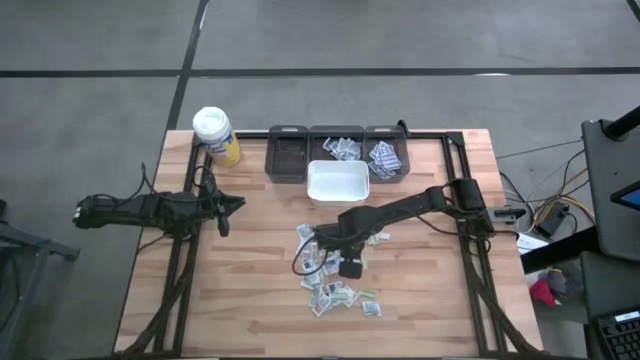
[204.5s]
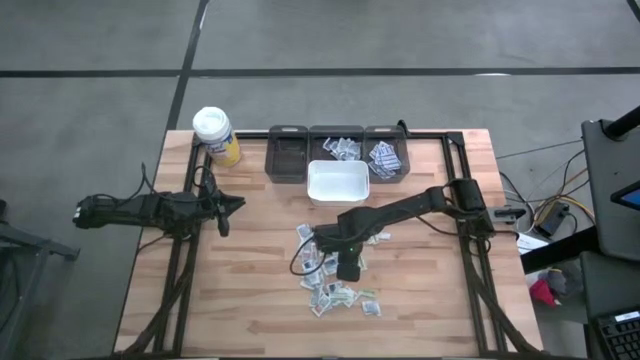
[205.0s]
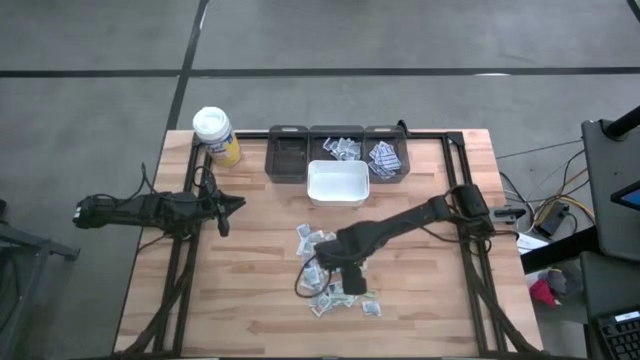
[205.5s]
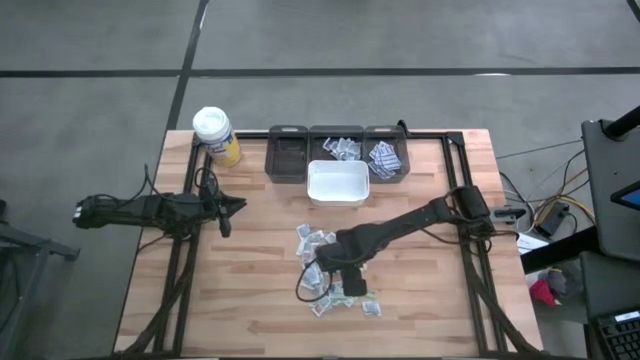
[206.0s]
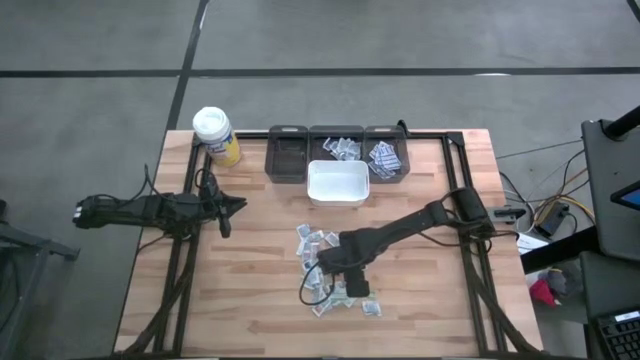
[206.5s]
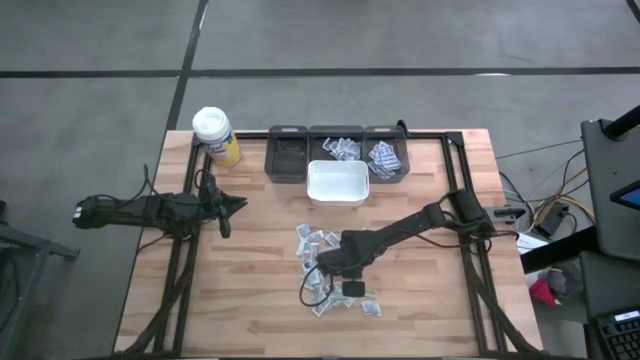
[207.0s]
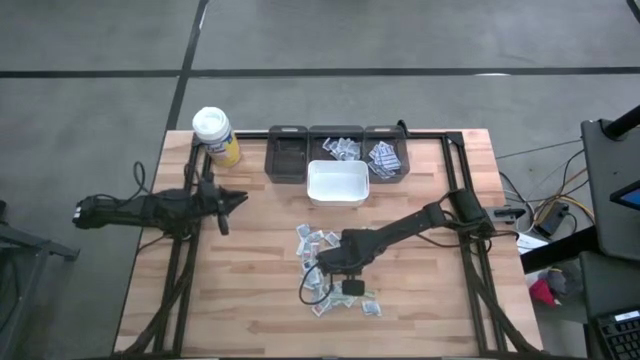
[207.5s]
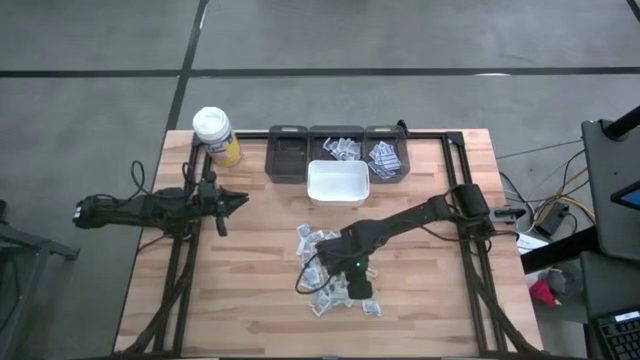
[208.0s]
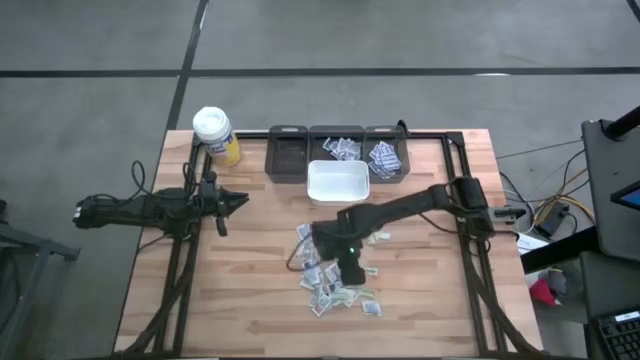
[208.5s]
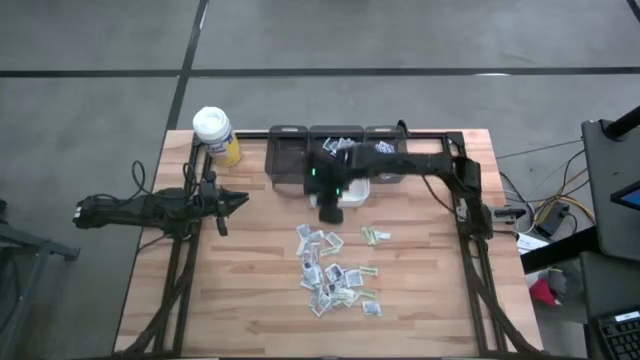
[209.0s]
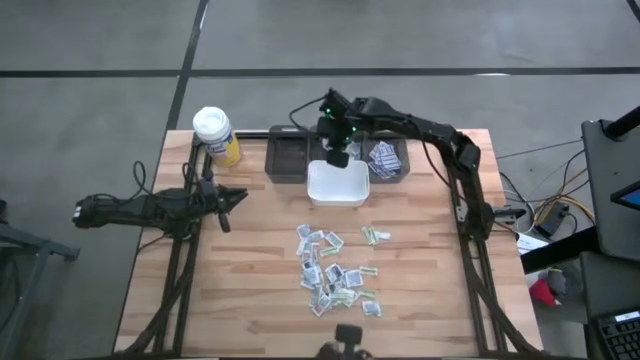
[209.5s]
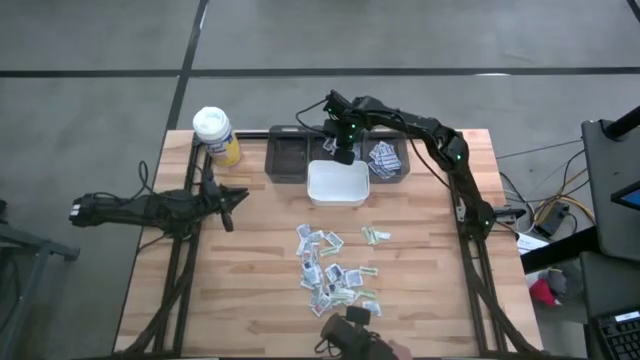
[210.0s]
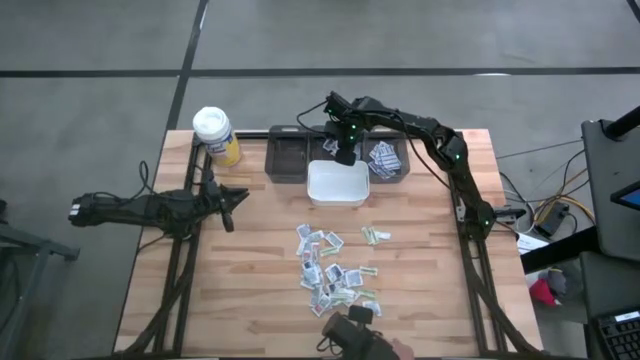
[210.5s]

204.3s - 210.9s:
Task: Pick & Place First Aid Supplies
Put the alcohol pad into the middle black bin

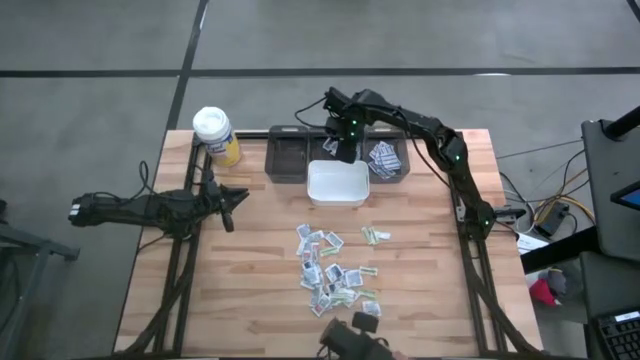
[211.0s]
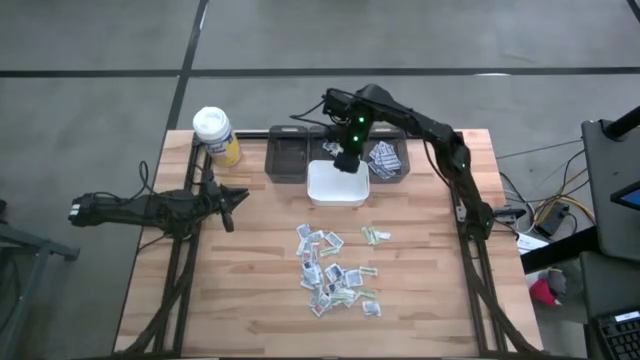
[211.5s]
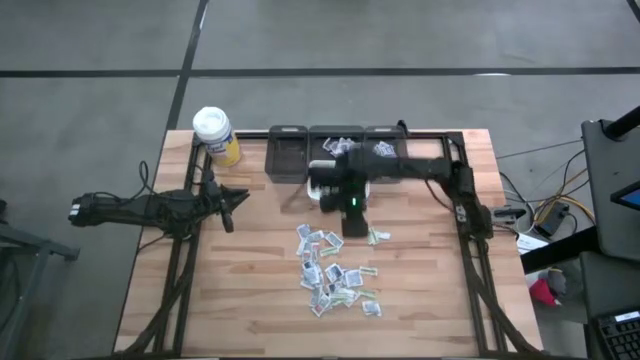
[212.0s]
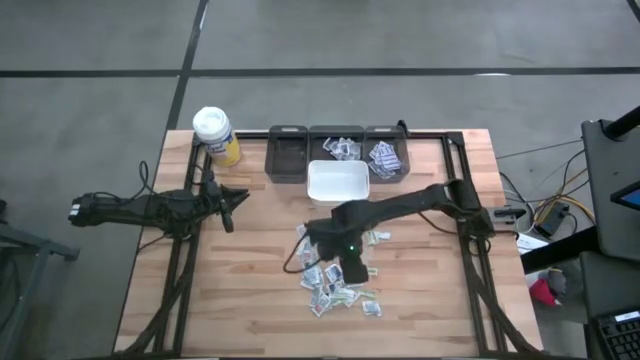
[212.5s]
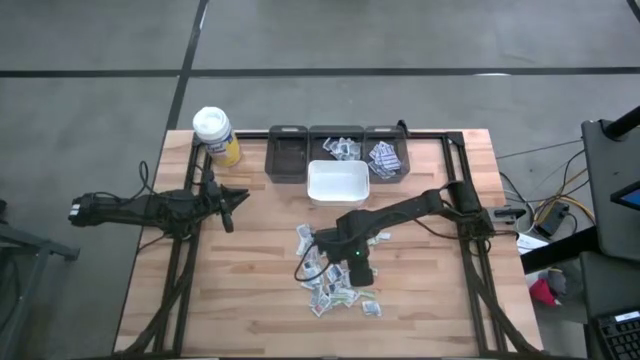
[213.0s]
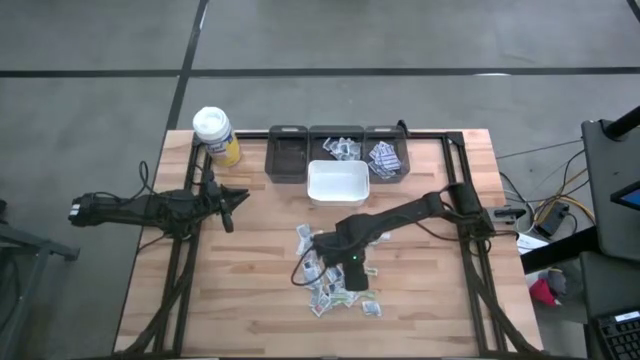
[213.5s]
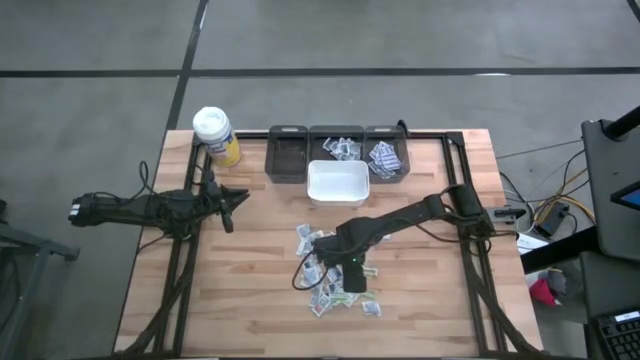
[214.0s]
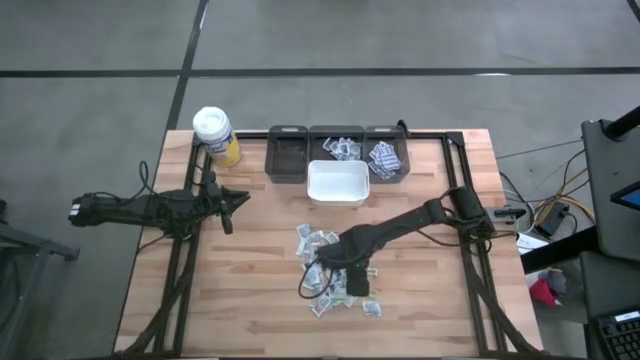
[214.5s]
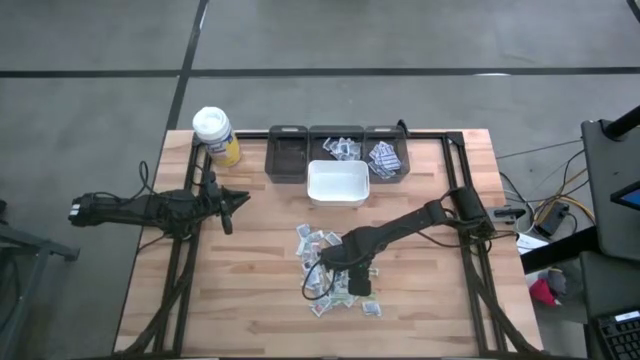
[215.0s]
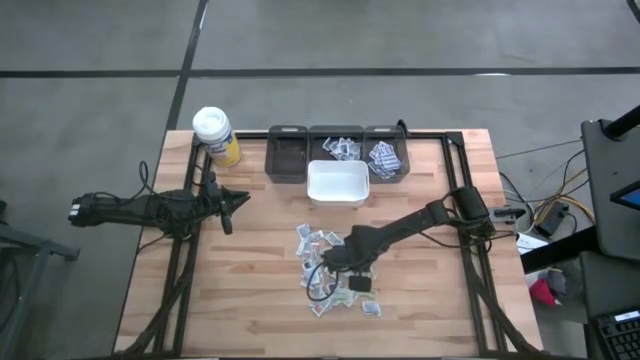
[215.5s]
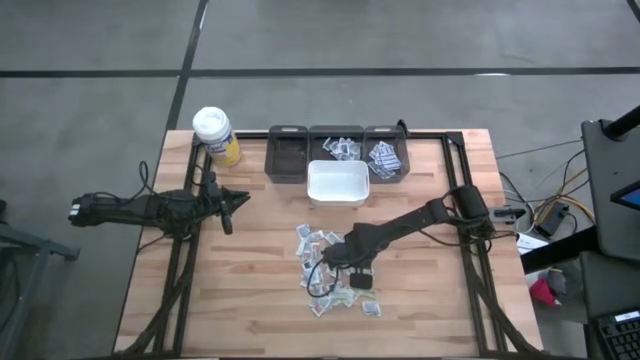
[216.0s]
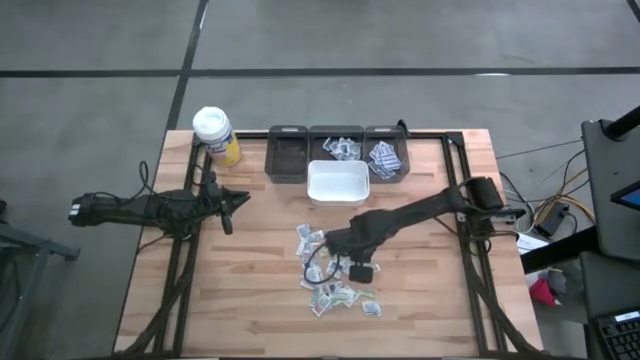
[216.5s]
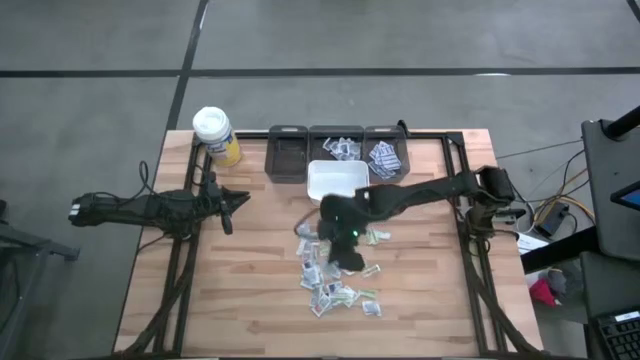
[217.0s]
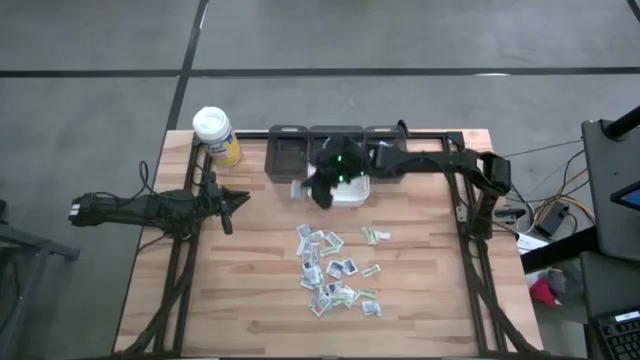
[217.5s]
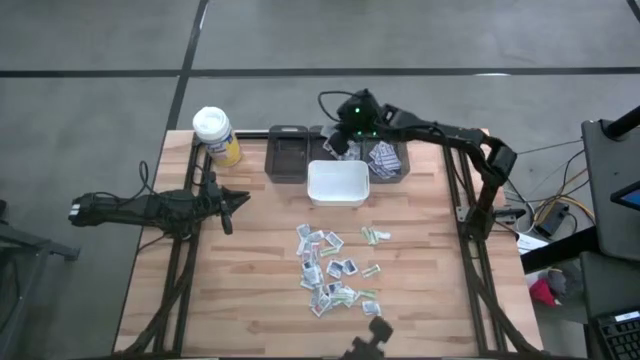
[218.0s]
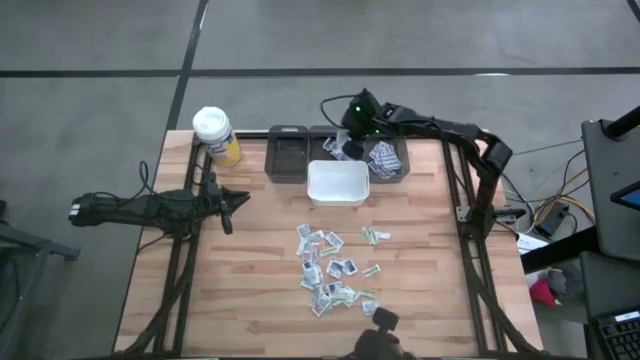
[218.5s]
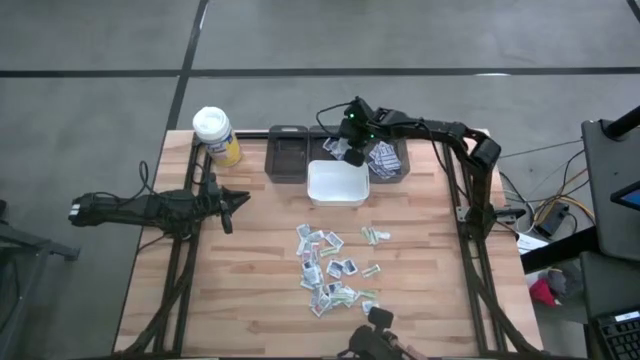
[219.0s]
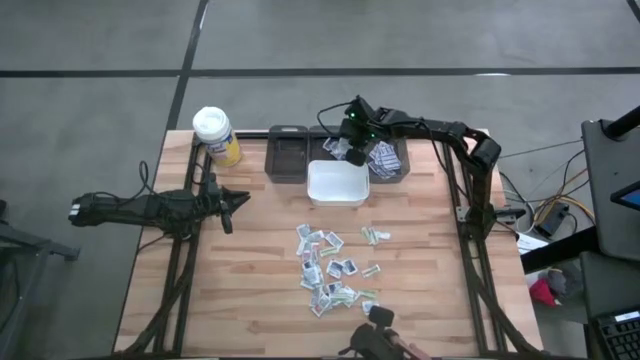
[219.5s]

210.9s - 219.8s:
Put the alcohol pad into the middle black bin

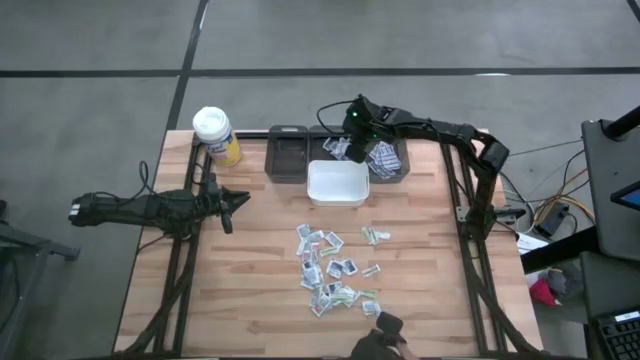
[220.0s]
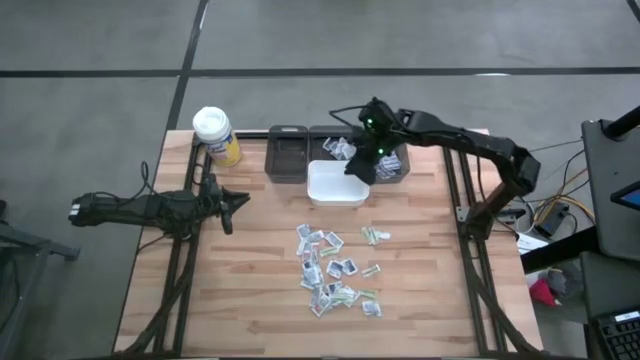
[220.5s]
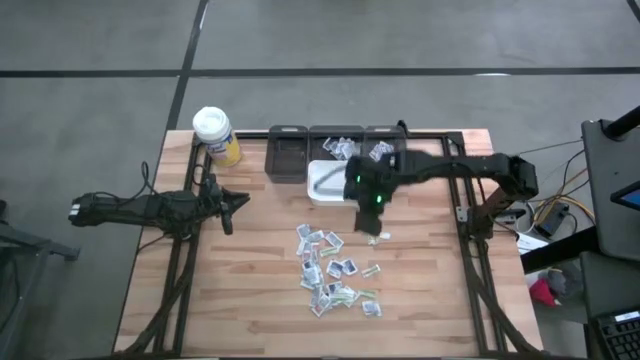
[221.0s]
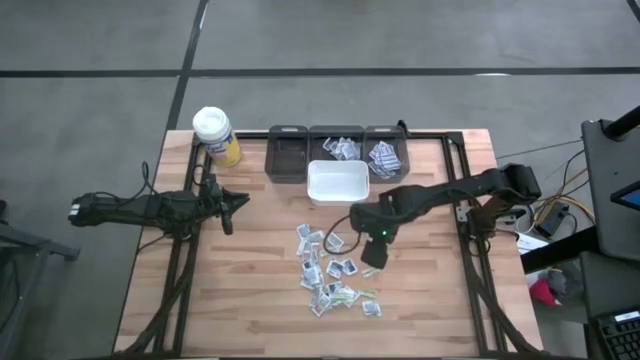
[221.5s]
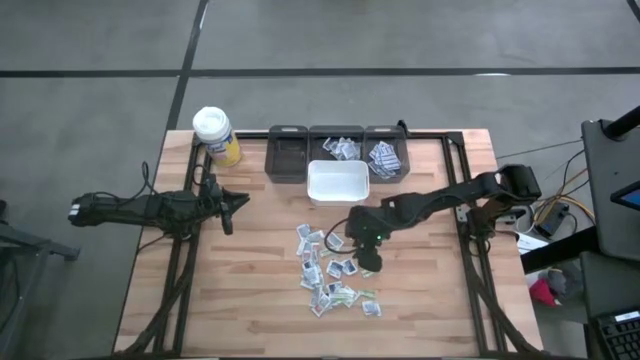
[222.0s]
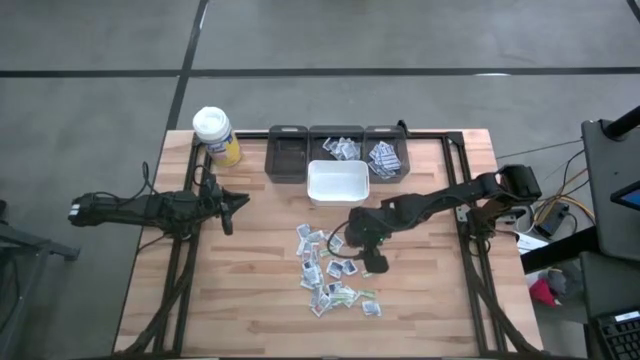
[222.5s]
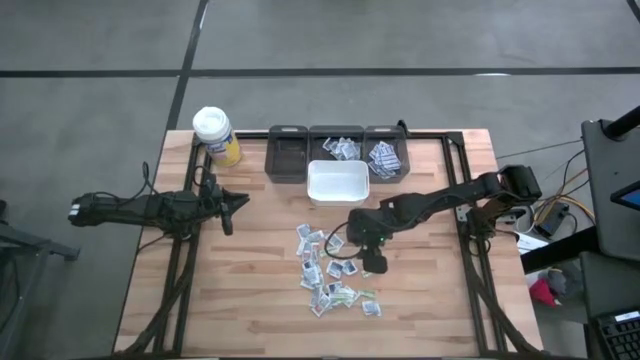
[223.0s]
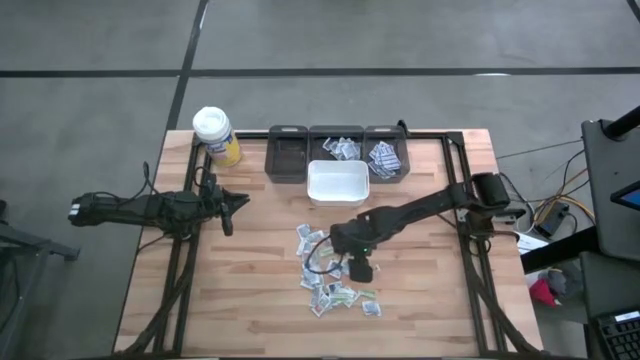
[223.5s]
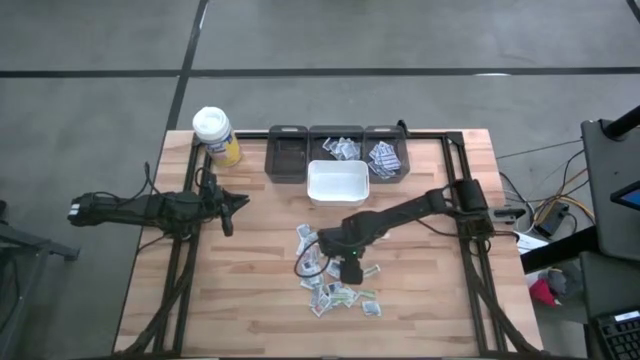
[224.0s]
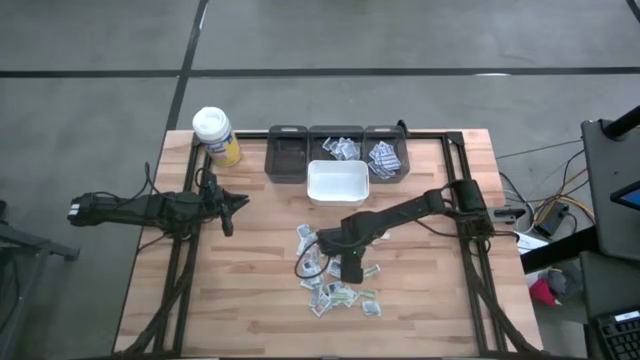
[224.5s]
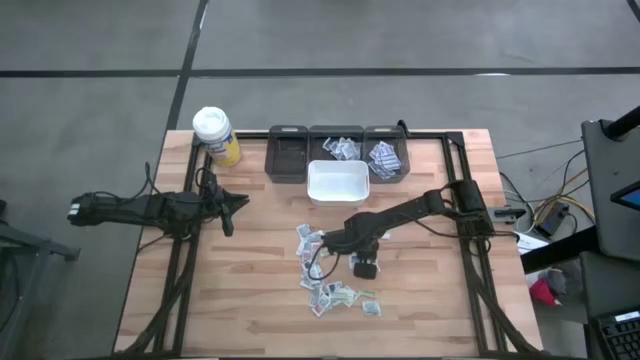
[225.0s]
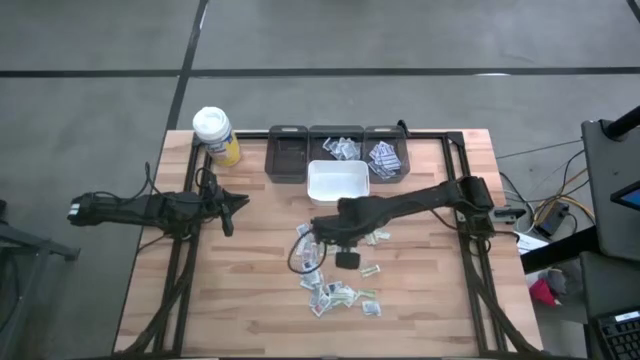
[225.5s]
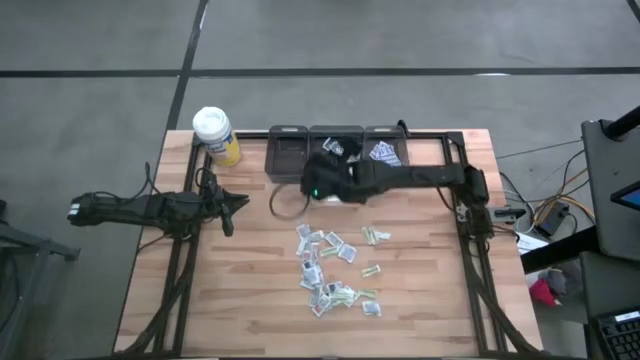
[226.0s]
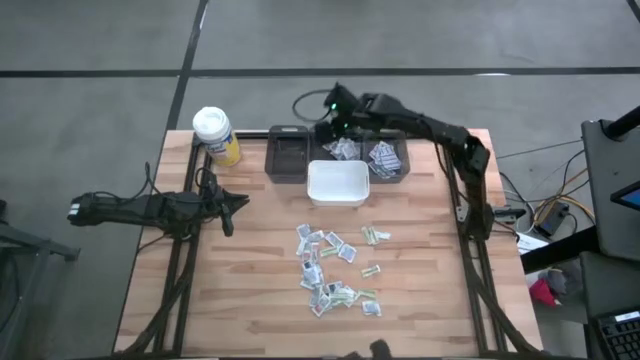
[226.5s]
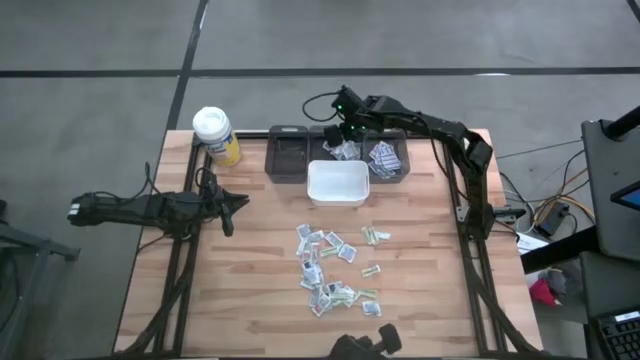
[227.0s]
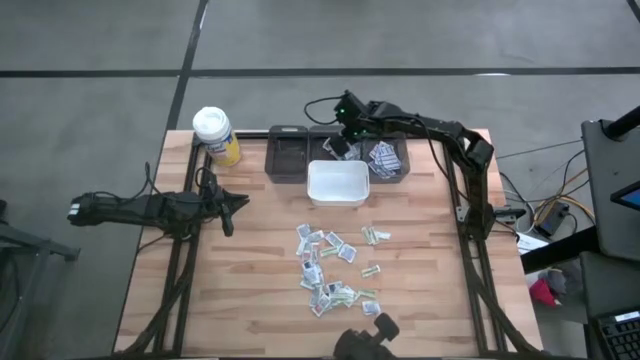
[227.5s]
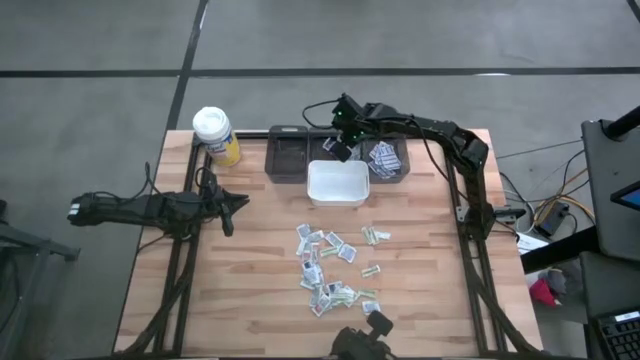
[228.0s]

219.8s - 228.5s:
Put the alcohol pad into the middle black bin
